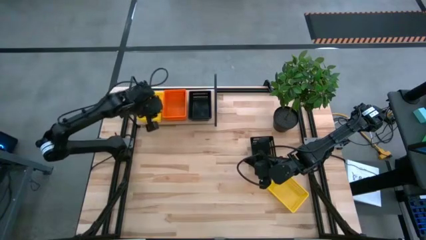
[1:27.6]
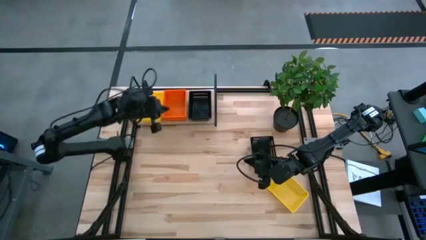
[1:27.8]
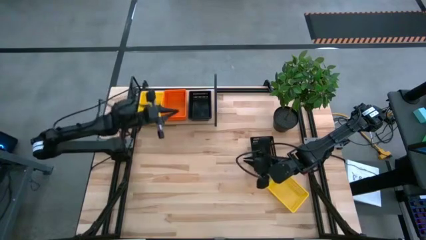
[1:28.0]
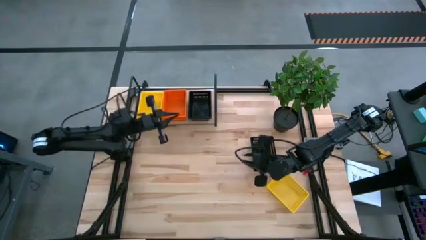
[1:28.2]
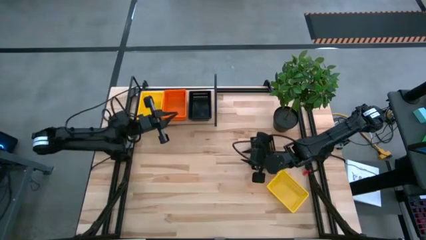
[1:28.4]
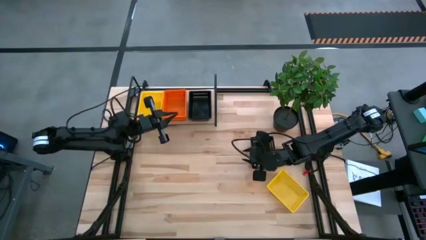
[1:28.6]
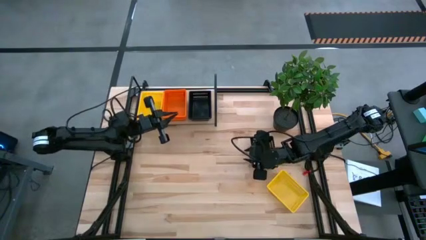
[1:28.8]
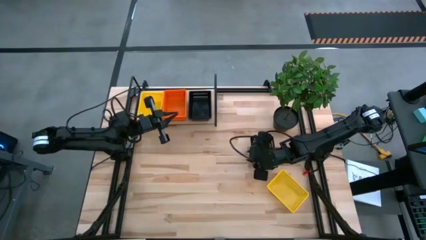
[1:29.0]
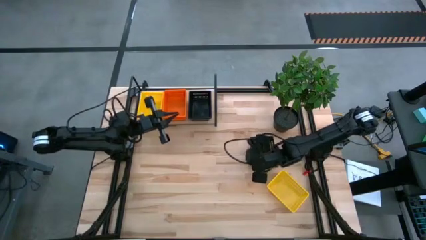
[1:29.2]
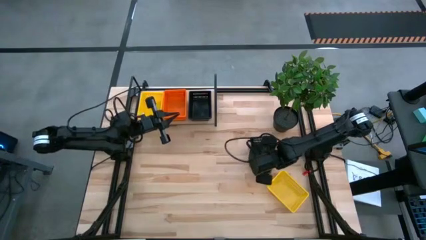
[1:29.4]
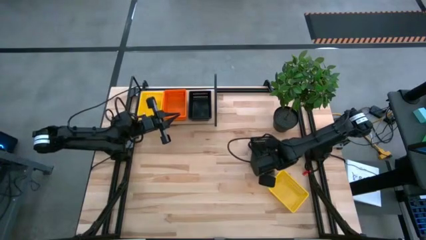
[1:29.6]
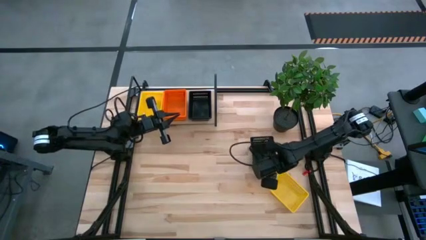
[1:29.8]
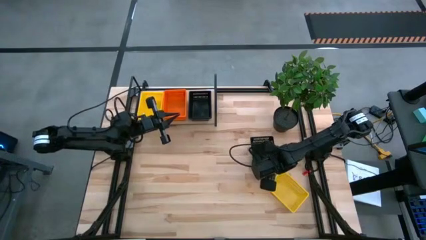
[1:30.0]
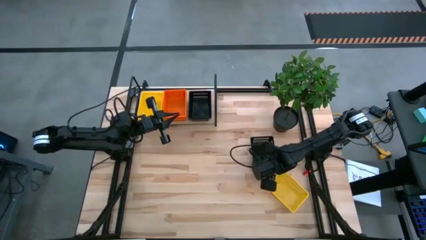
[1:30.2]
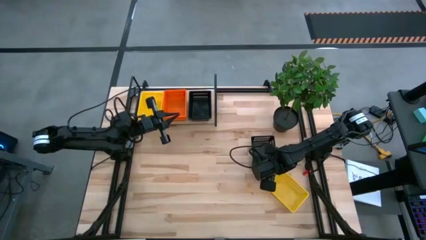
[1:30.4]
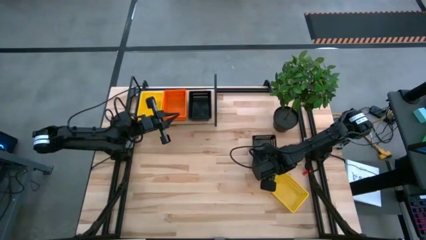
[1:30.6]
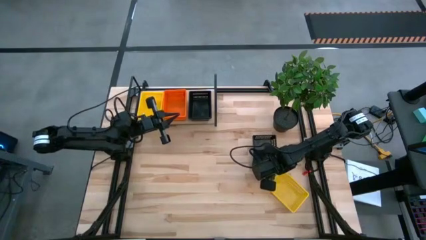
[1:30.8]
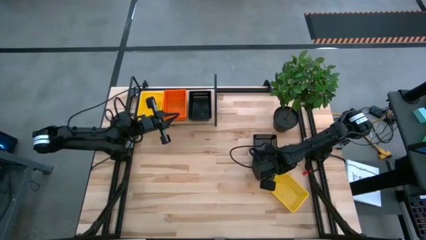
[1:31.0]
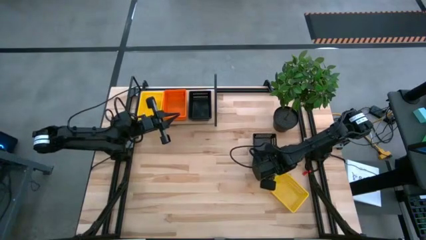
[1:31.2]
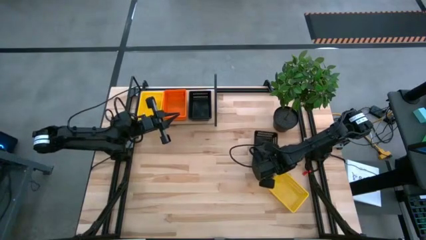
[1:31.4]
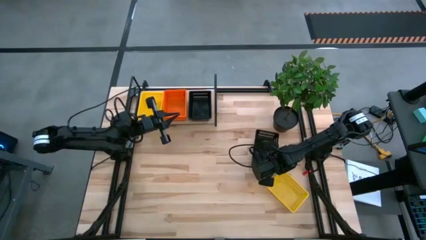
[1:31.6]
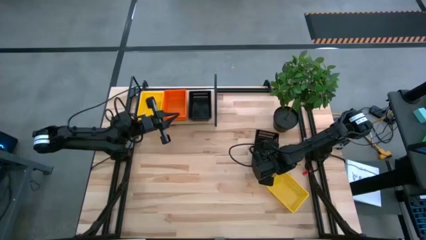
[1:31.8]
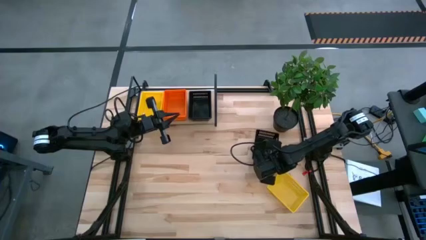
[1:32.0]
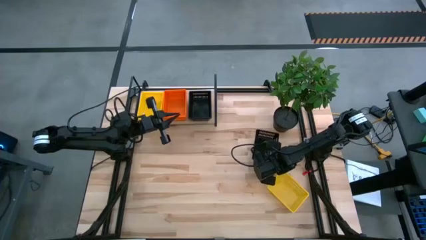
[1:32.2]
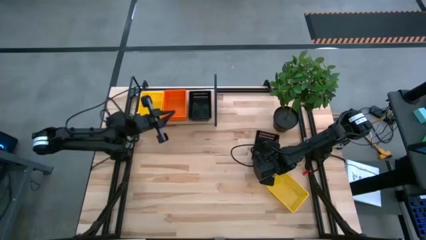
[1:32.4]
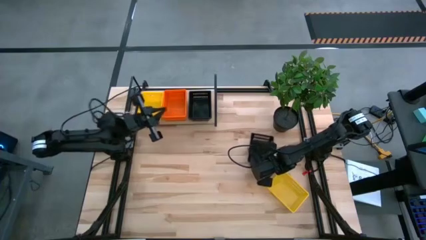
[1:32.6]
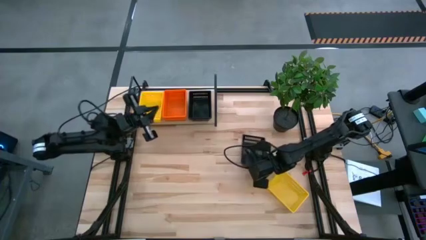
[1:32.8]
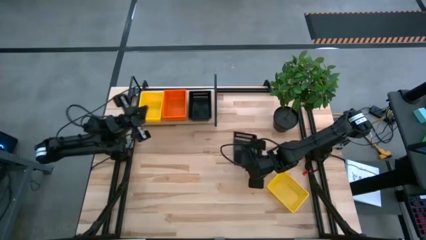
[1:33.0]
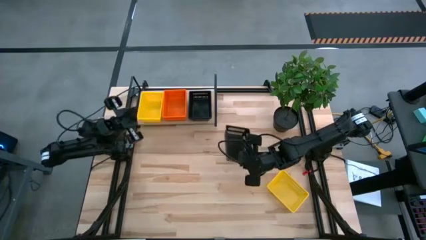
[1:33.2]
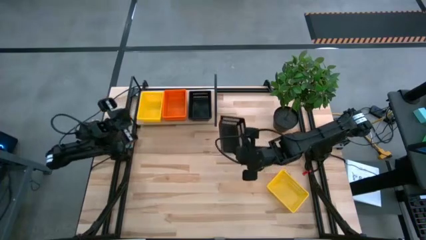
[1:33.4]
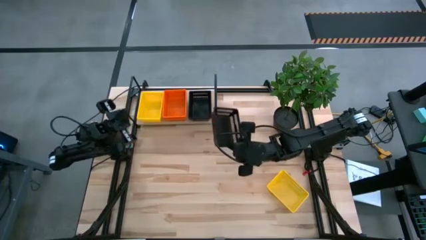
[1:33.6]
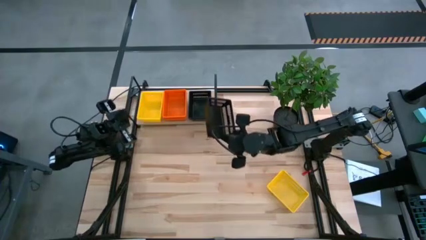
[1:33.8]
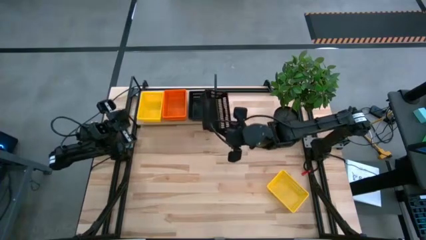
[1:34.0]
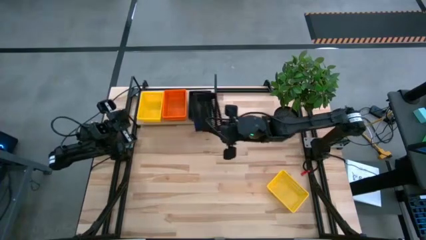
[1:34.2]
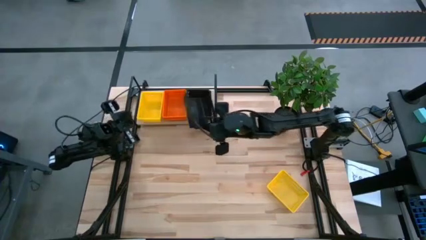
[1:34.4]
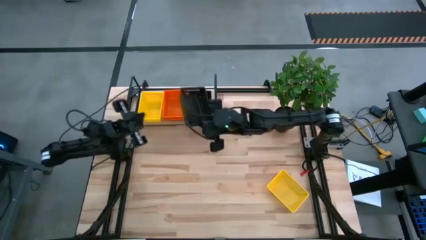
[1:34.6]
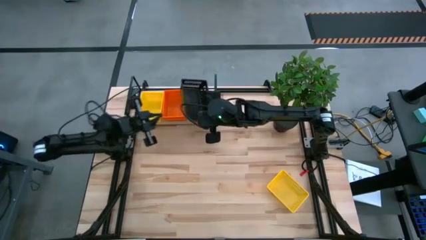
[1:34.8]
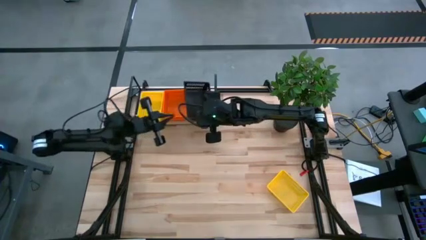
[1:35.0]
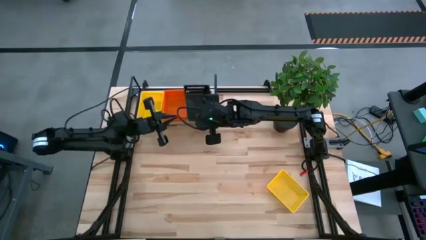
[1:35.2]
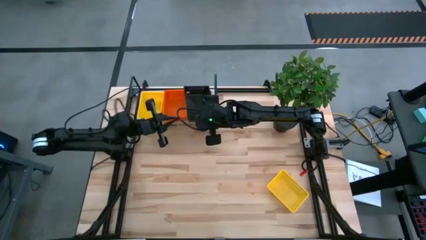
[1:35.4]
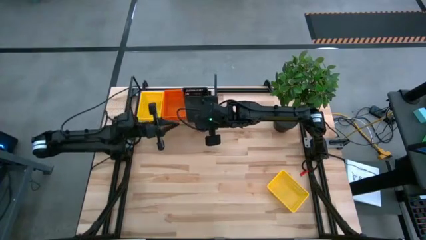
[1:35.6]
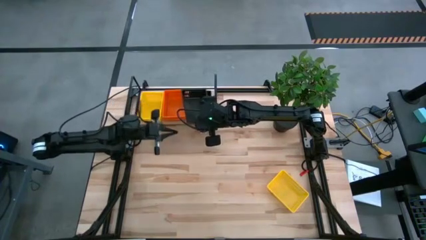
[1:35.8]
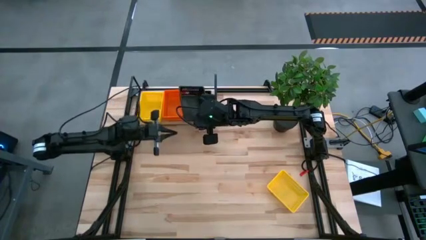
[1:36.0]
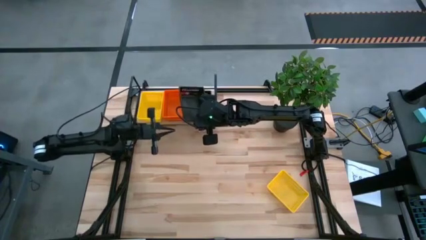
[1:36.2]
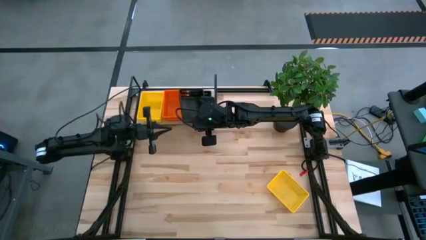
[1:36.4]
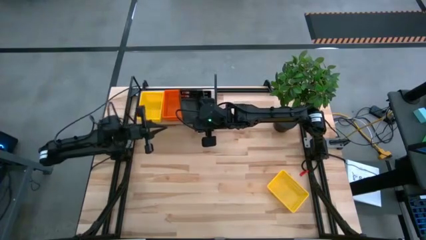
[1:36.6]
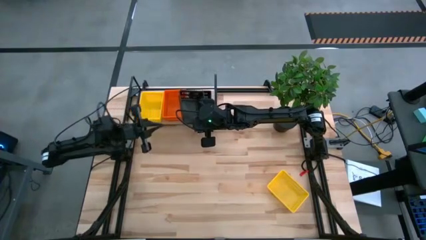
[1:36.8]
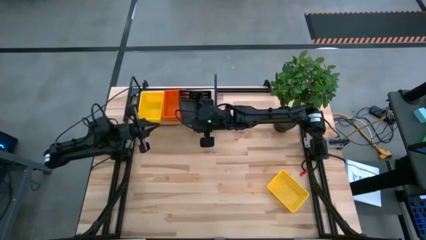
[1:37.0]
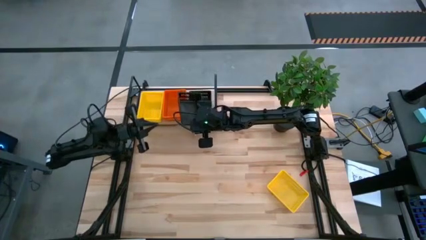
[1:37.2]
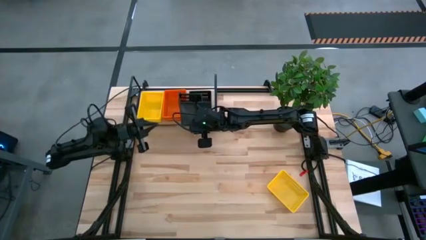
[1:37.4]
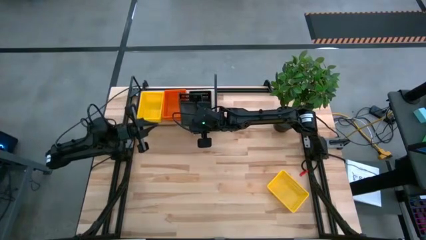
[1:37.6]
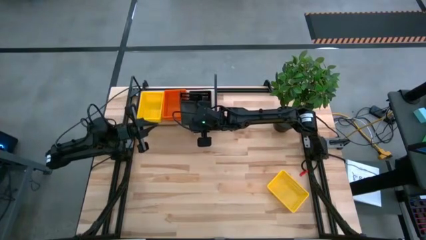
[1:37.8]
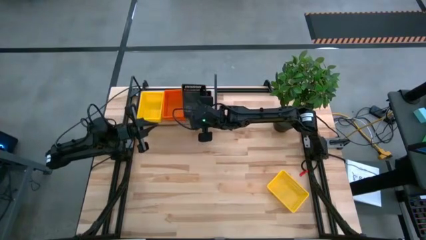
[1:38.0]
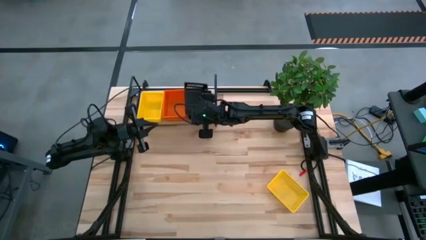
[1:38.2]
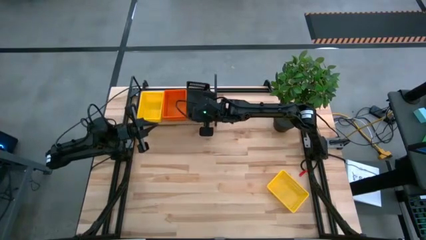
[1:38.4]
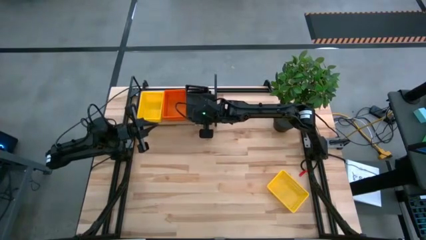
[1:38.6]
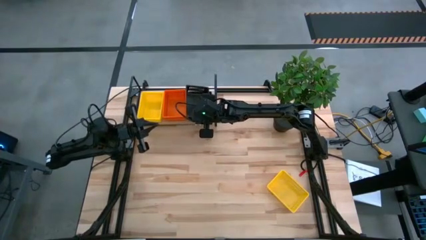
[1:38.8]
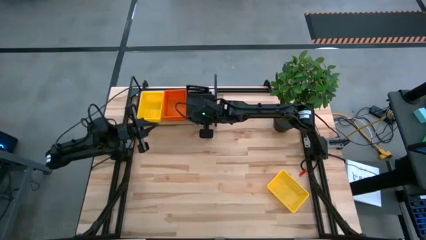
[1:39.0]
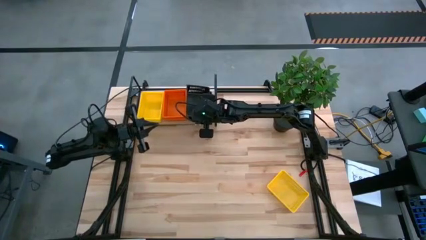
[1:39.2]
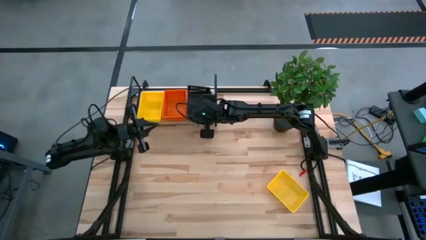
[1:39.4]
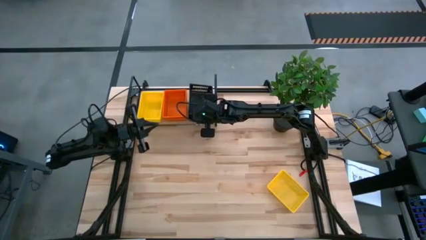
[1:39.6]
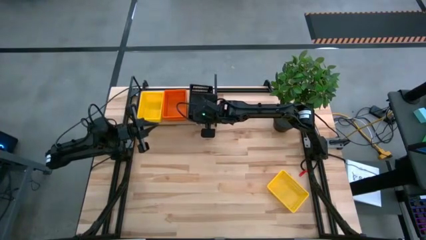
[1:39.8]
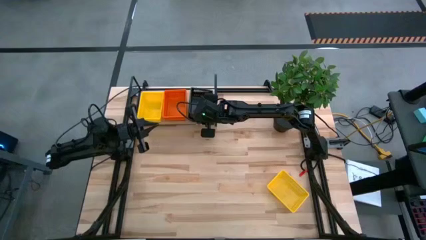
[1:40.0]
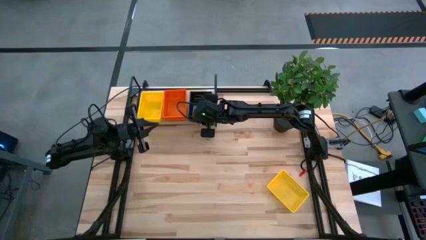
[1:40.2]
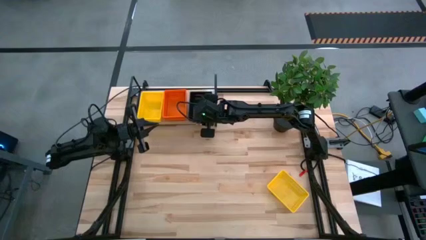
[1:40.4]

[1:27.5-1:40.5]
Task: Stack baskets on shelf by color
Stack the black bin on the black bin on the shelf

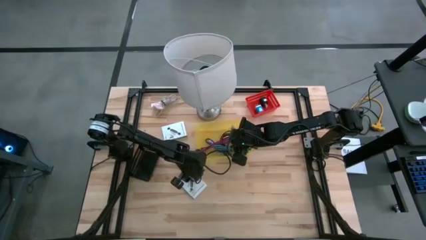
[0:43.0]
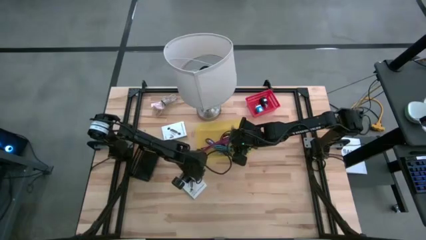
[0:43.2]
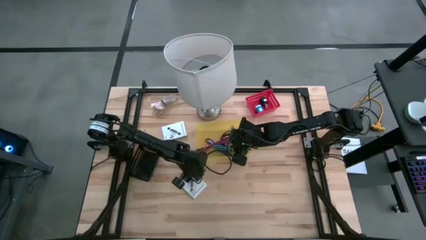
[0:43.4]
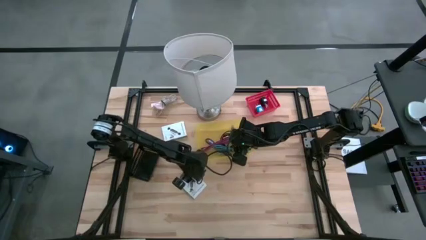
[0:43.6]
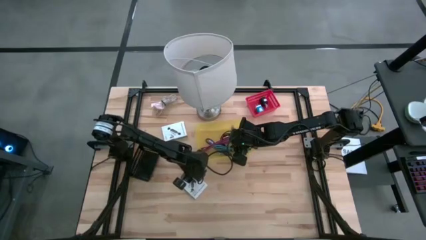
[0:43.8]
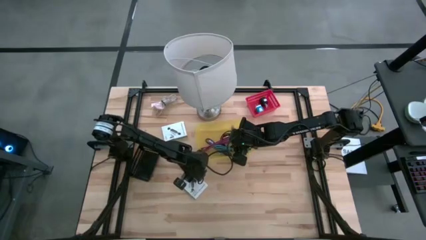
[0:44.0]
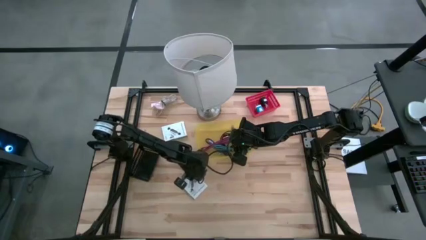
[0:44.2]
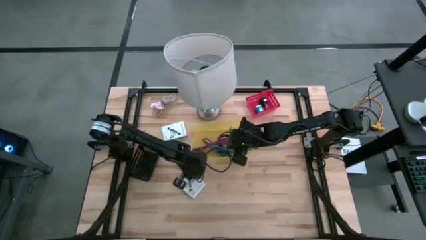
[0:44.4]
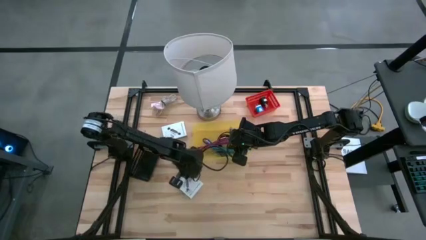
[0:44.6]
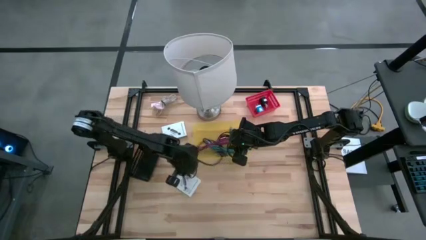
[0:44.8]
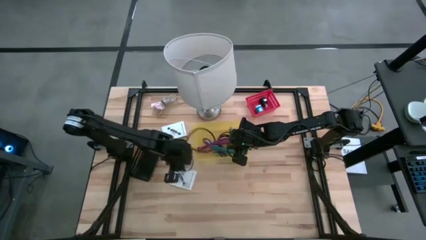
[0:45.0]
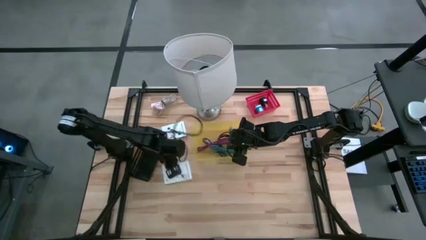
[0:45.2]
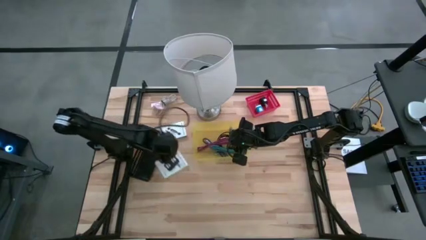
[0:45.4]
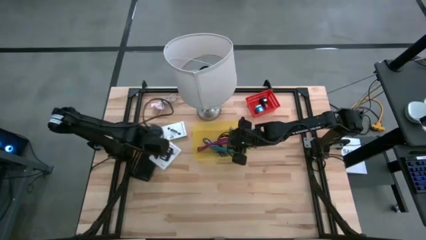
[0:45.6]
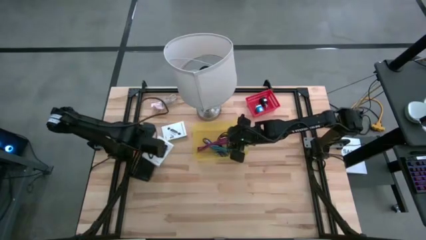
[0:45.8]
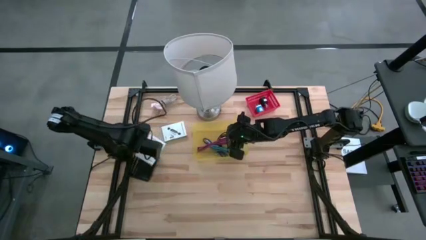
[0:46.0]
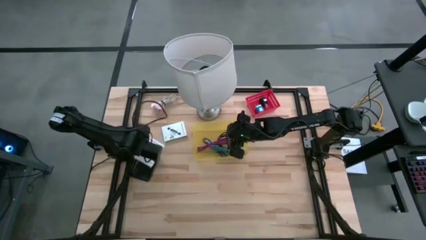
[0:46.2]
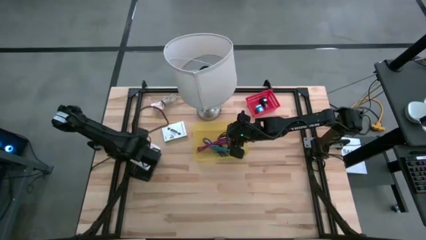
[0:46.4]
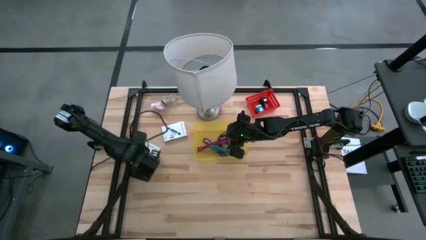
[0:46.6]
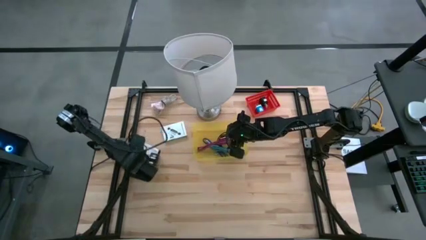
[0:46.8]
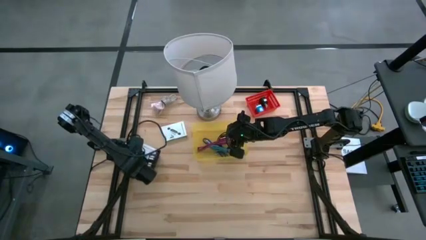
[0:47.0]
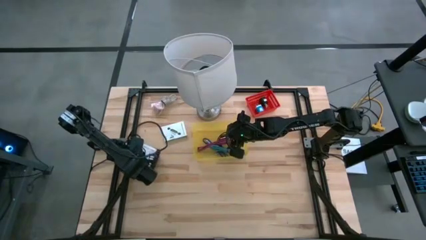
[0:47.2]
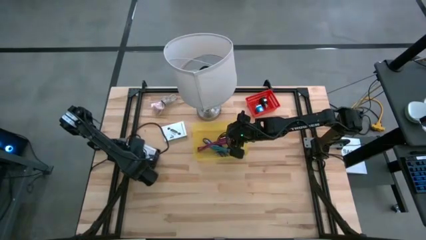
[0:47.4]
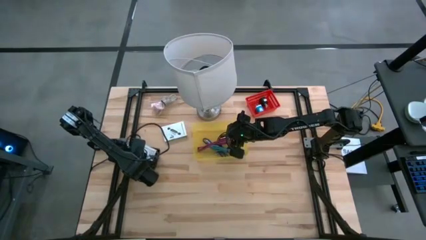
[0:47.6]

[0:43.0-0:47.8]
Task: Pick and place items into bin
Put the bottom white card reader box into the black bin
